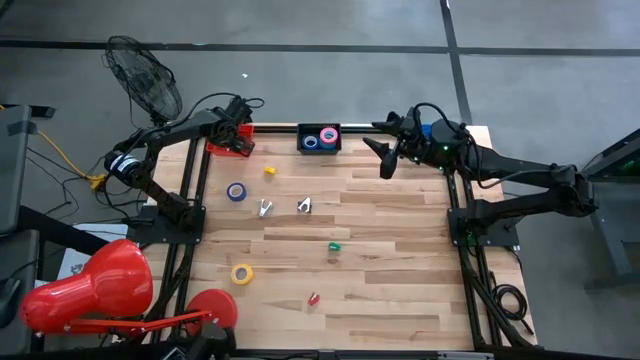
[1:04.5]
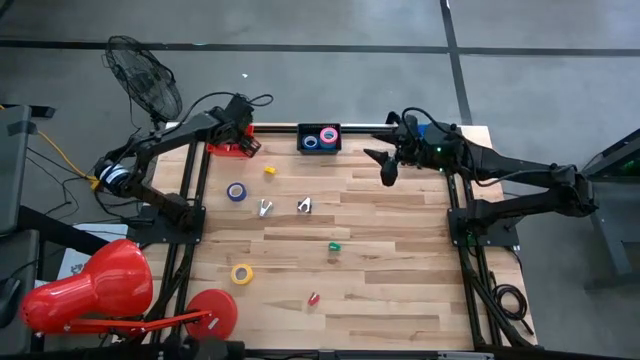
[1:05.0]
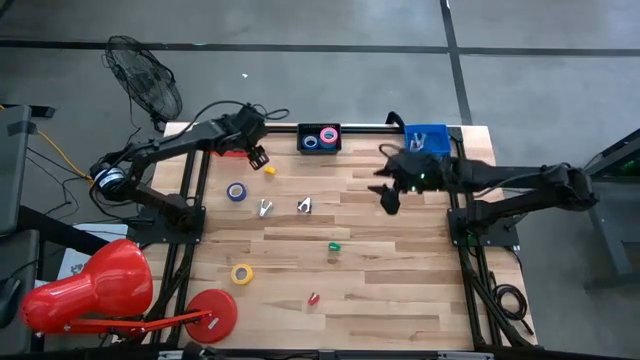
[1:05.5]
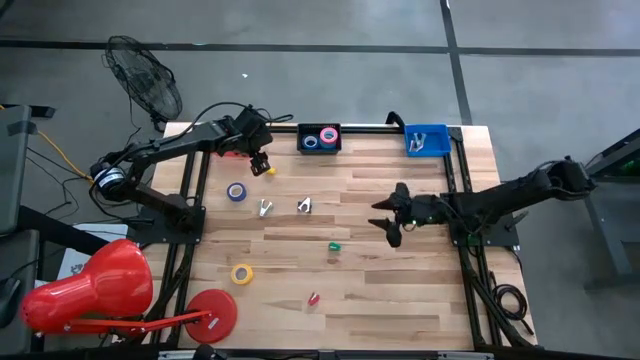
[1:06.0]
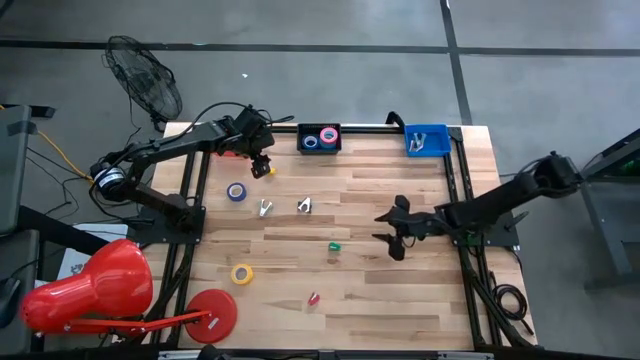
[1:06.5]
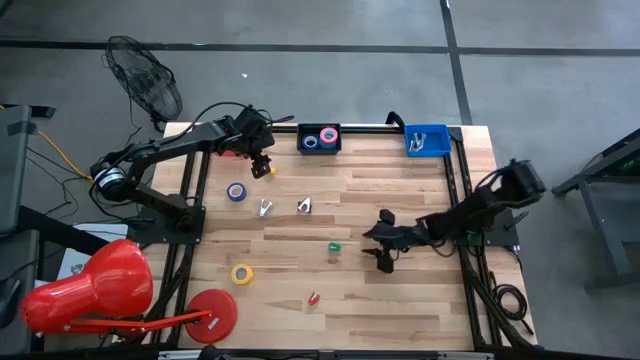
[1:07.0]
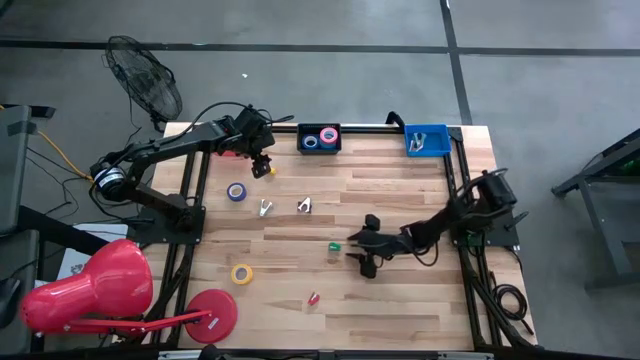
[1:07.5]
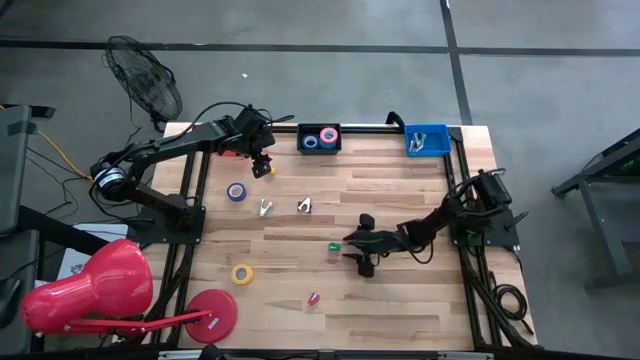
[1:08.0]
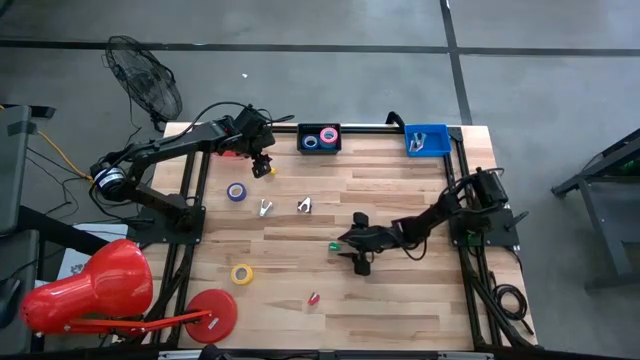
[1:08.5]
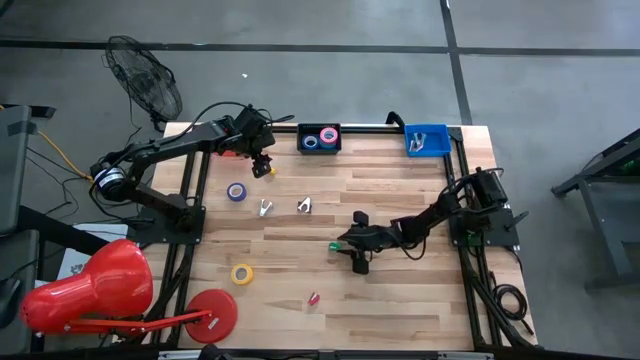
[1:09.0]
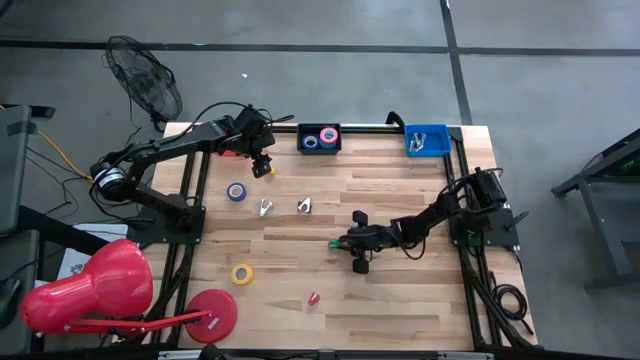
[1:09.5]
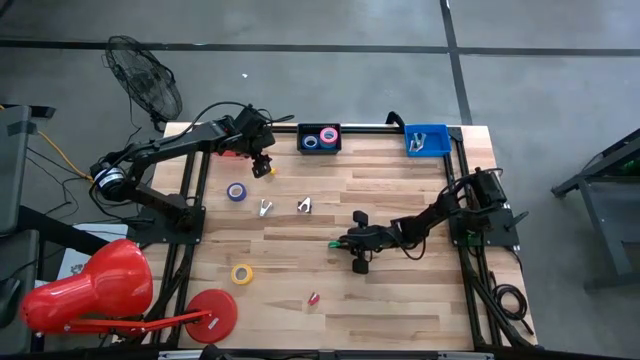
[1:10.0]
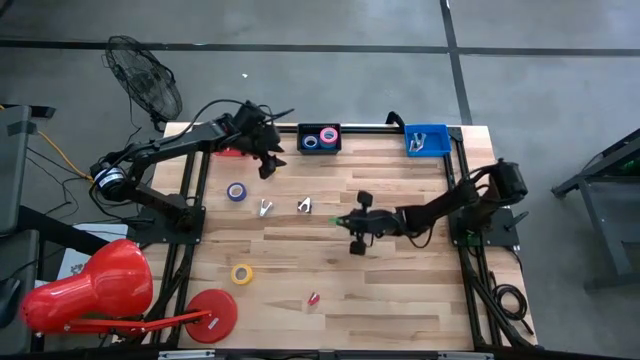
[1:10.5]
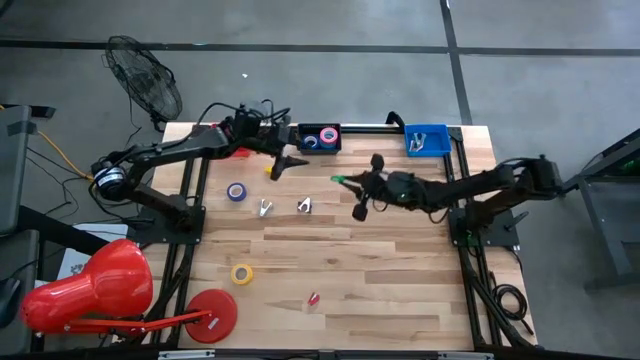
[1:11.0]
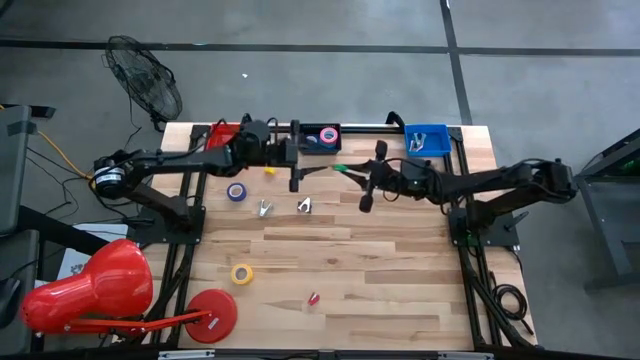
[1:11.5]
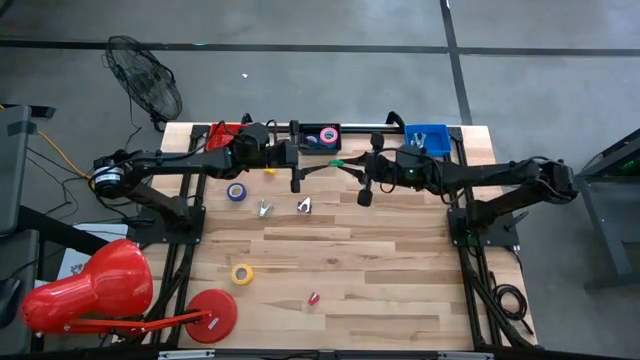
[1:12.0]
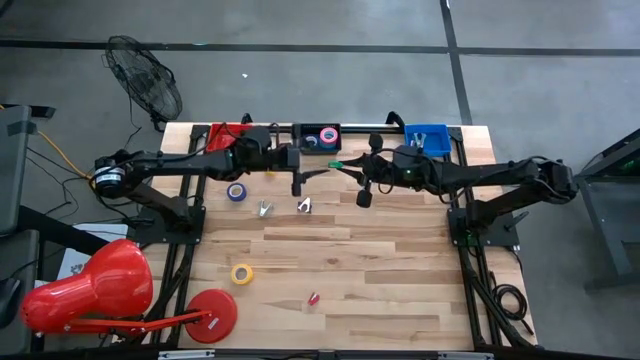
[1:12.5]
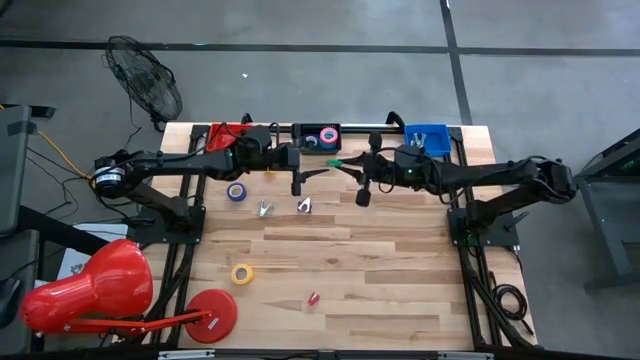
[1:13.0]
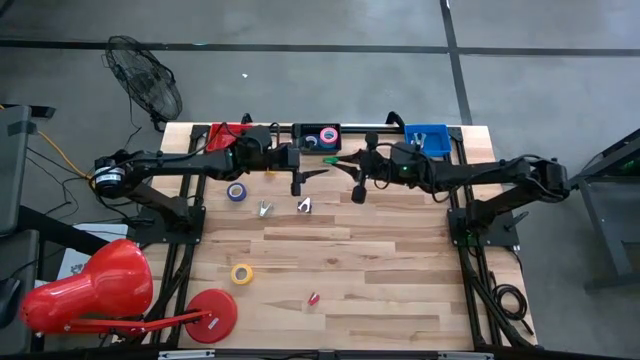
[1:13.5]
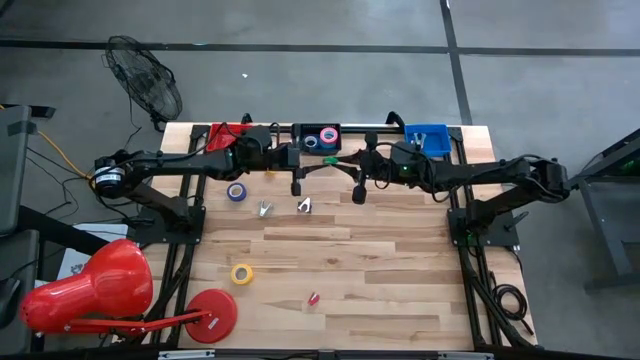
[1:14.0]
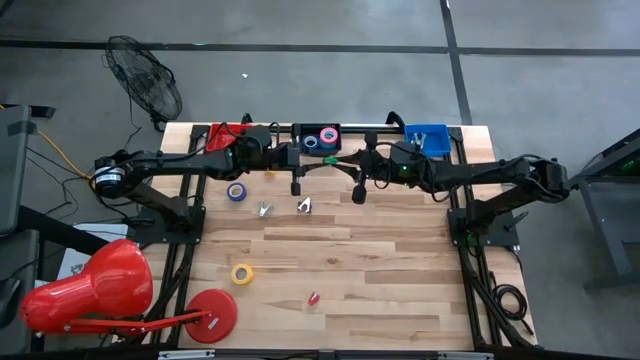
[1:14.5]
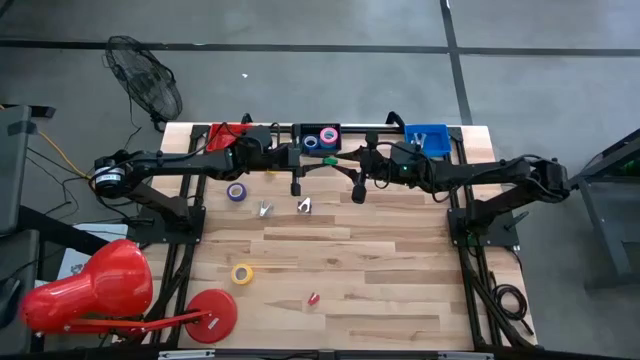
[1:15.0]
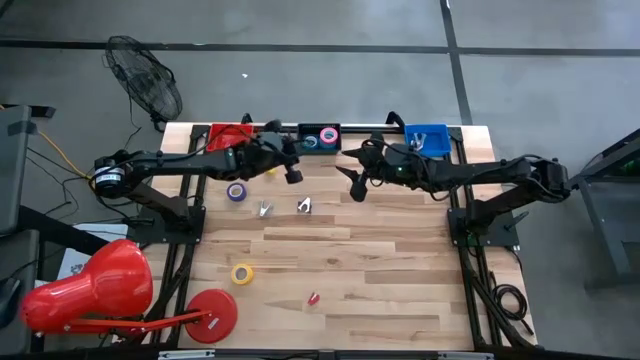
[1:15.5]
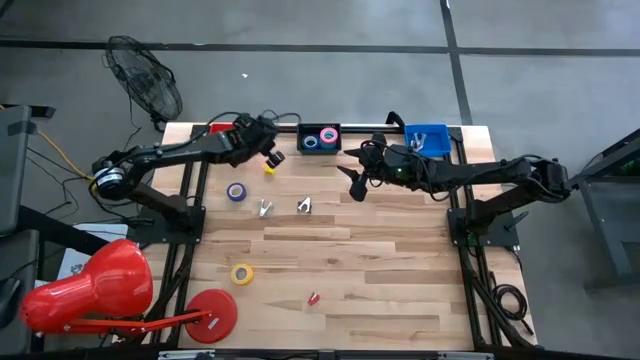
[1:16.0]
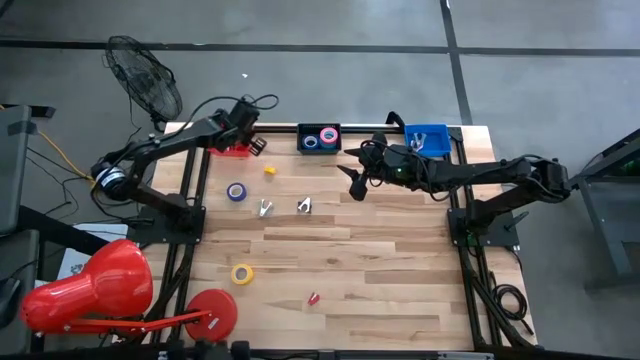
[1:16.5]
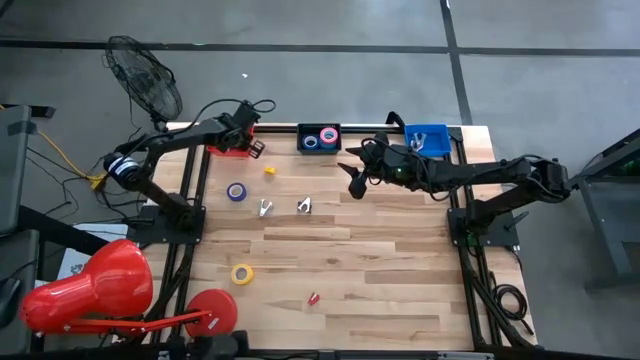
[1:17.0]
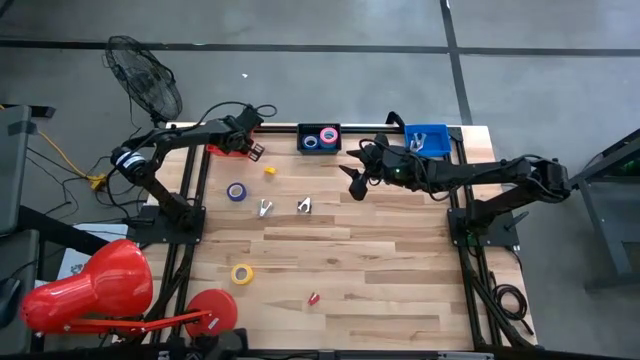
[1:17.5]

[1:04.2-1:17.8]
Task: Pick and place Stapler, Stapler remover, tape
Put the green stapler into the red bin

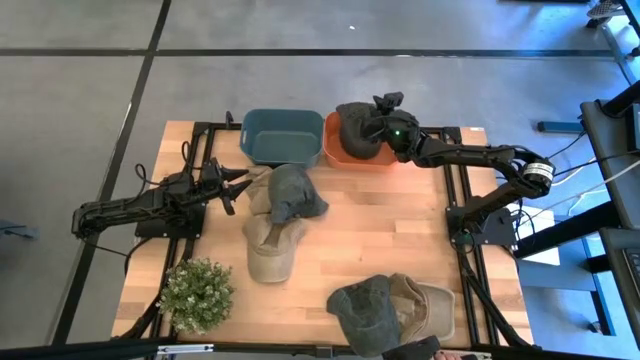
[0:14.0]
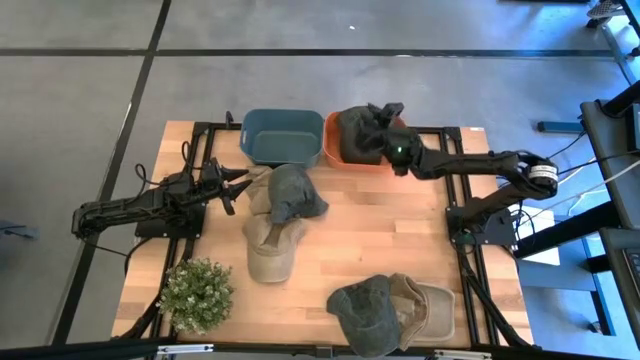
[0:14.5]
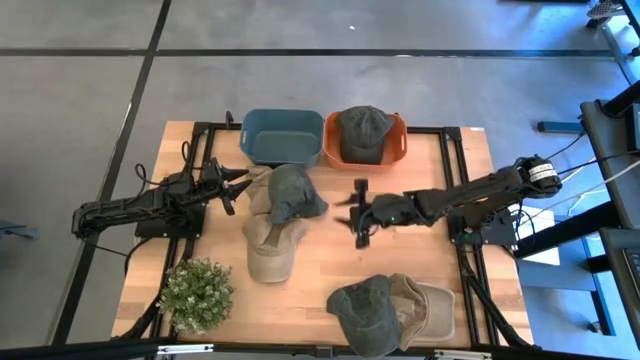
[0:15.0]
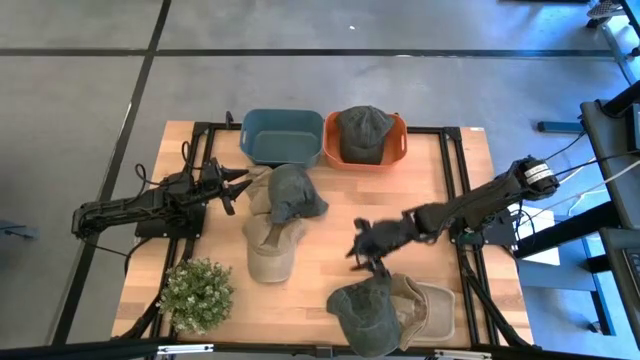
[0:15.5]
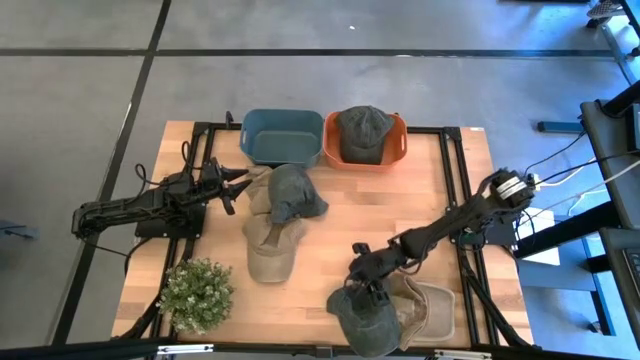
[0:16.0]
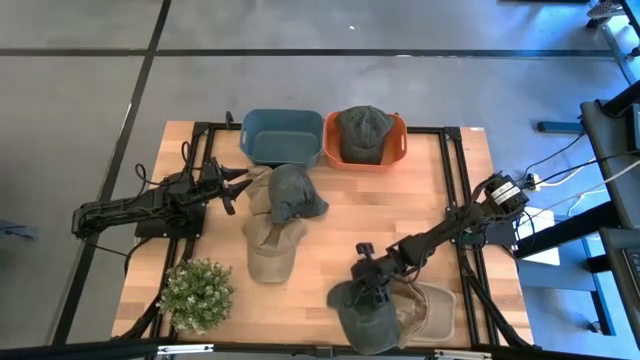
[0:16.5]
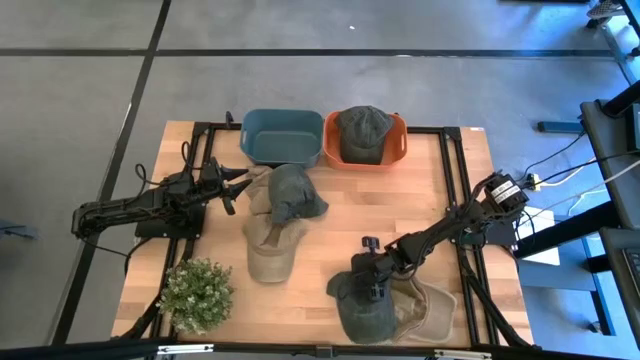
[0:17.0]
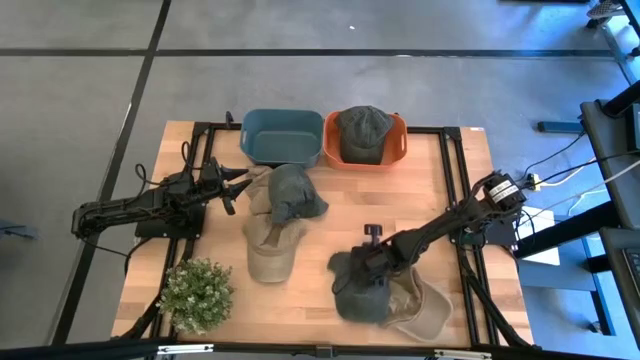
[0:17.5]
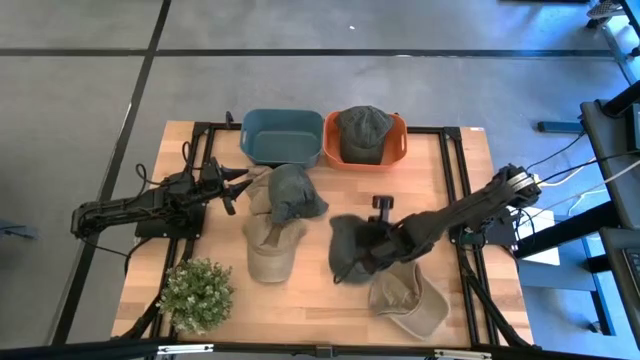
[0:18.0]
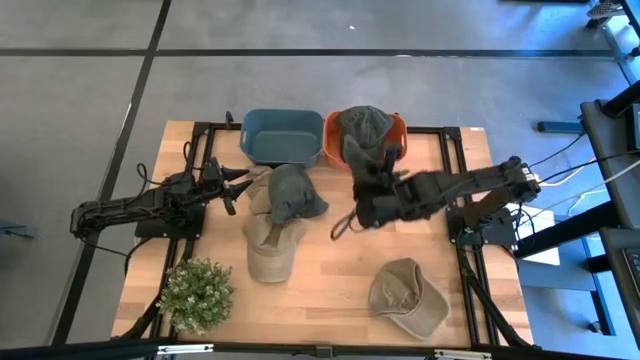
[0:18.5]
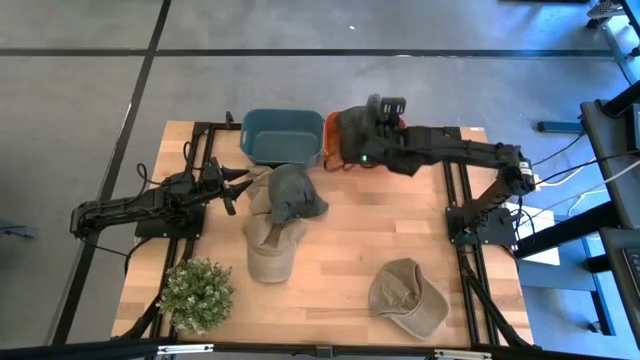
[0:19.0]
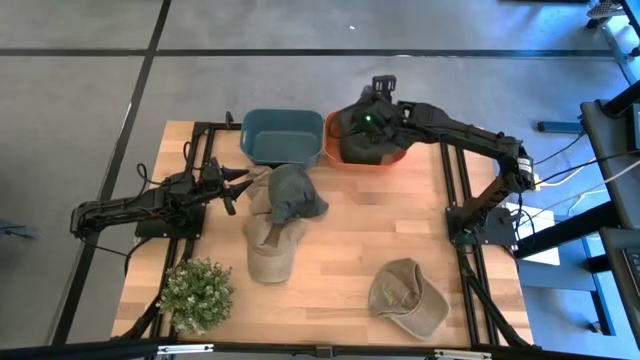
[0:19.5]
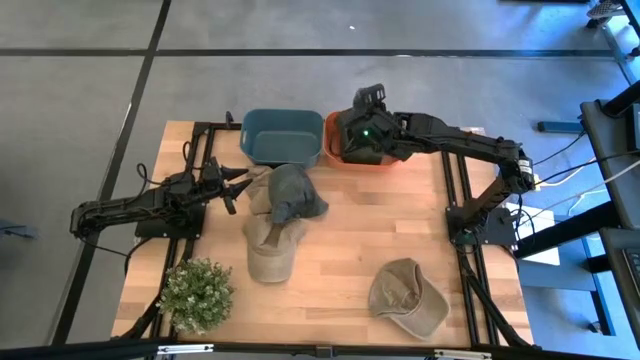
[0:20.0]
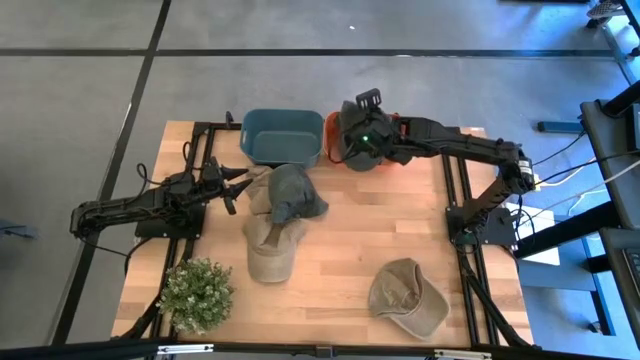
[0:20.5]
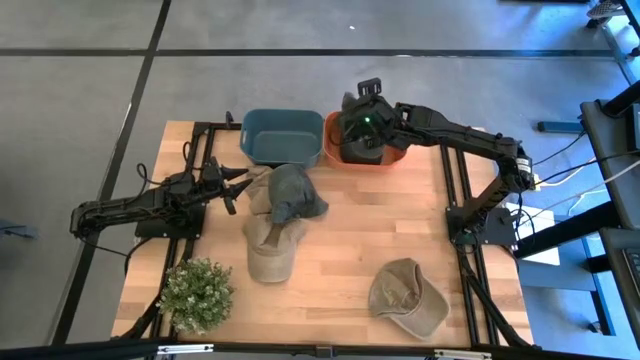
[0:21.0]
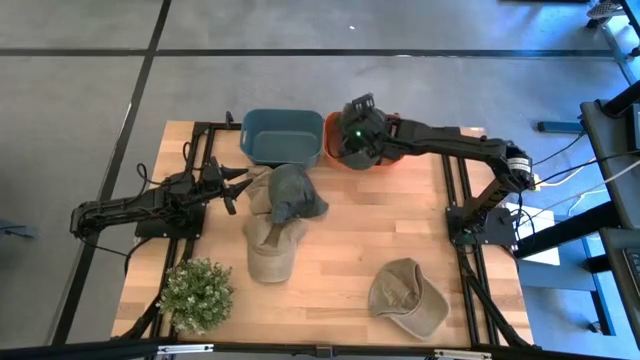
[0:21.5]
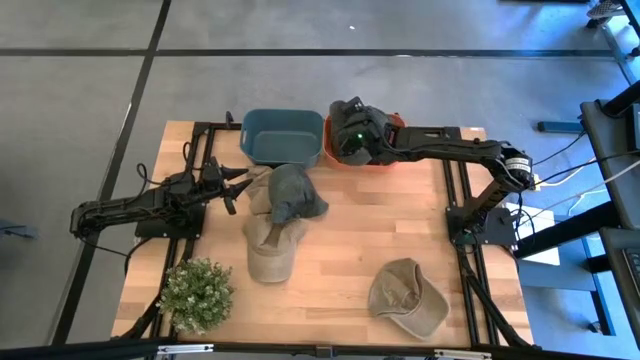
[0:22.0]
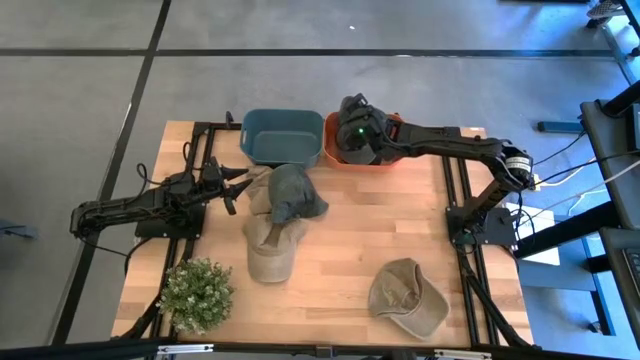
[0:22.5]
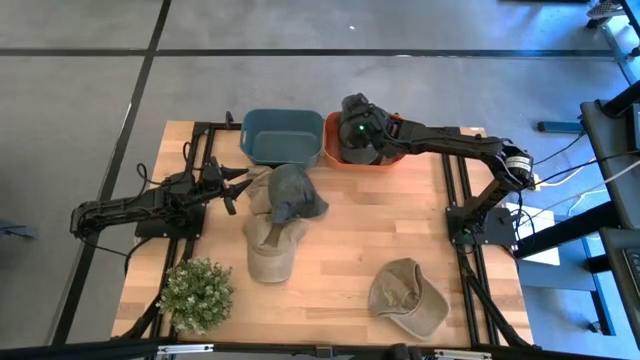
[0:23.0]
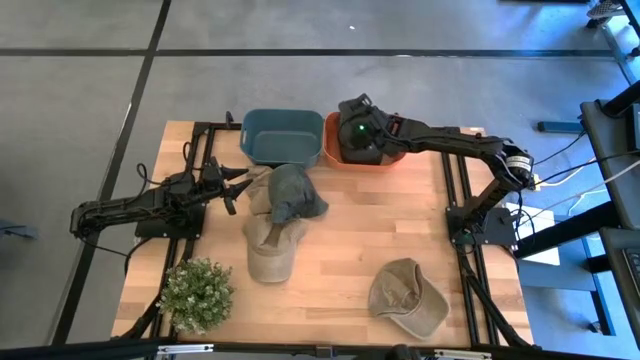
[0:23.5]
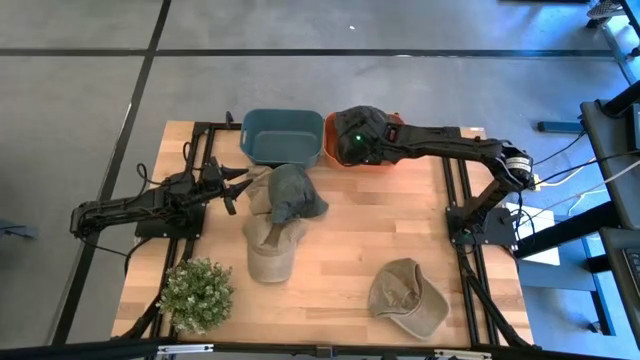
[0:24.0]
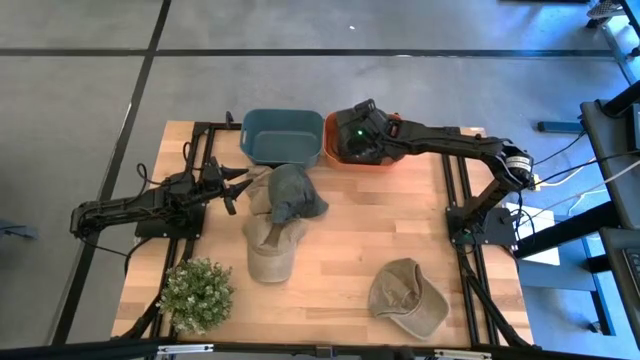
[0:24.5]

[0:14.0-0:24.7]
Task: Pick & Place hat
Put the bottom black cap into the orange bin
